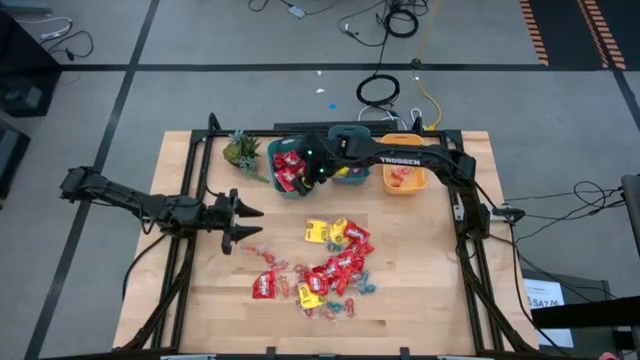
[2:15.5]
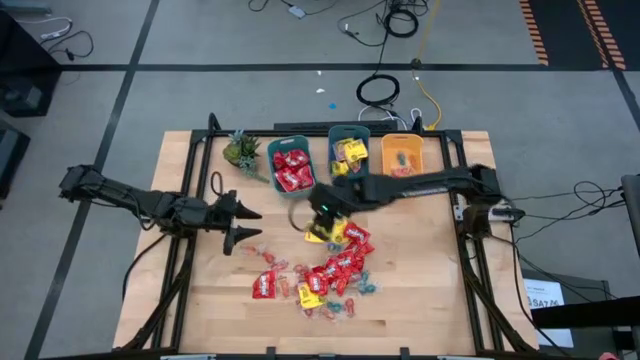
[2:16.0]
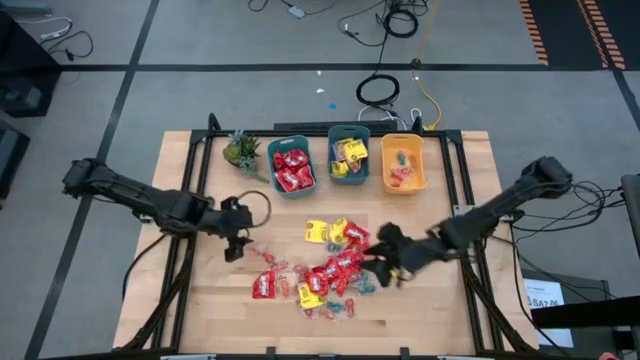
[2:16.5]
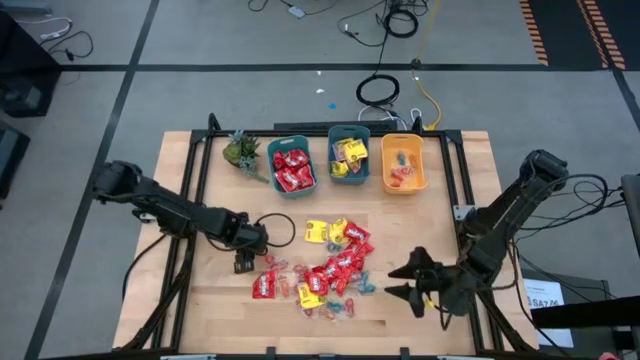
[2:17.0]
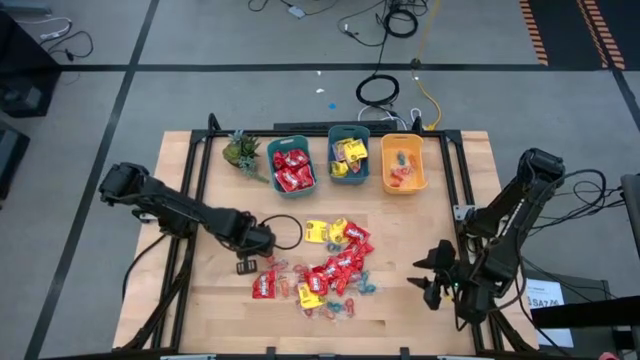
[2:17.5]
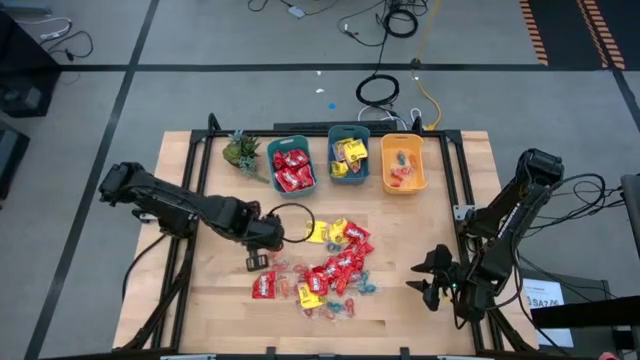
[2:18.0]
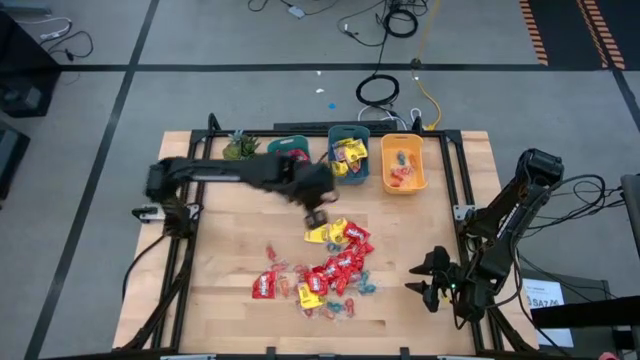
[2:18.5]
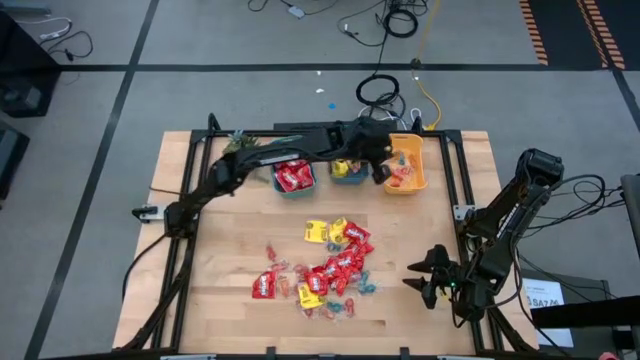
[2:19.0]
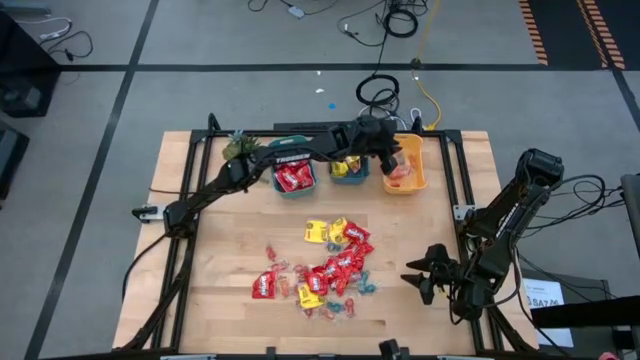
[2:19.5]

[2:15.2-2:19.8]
Task: Sort candy
Put the orange gummy candy into the yellow bin

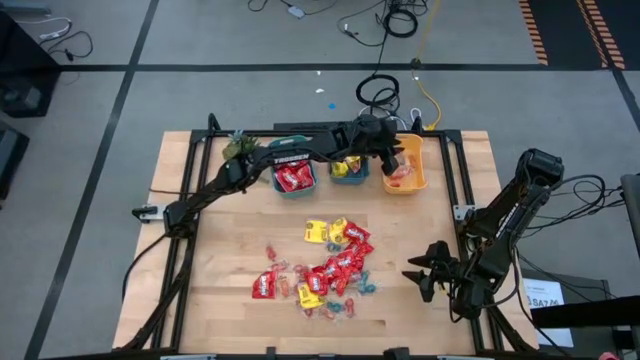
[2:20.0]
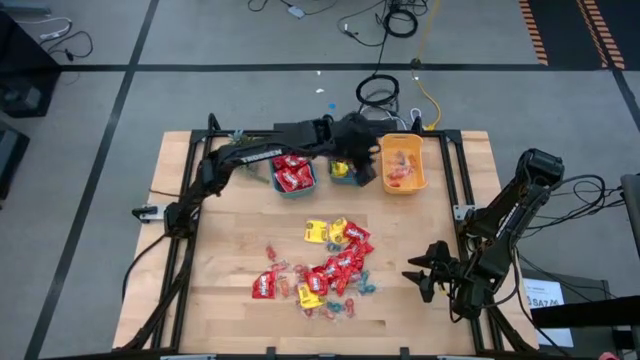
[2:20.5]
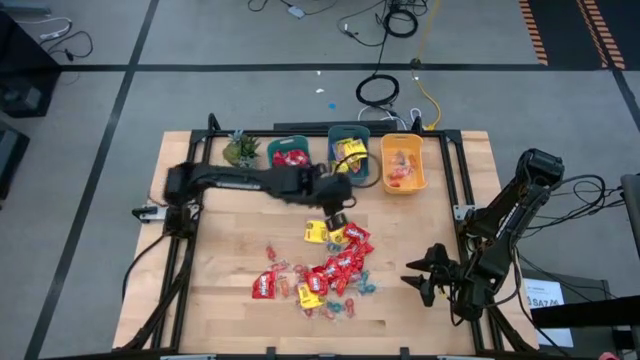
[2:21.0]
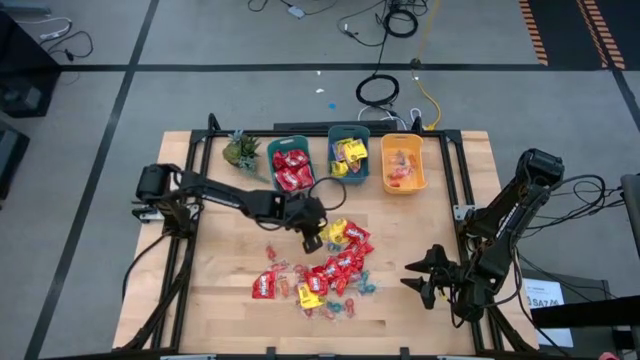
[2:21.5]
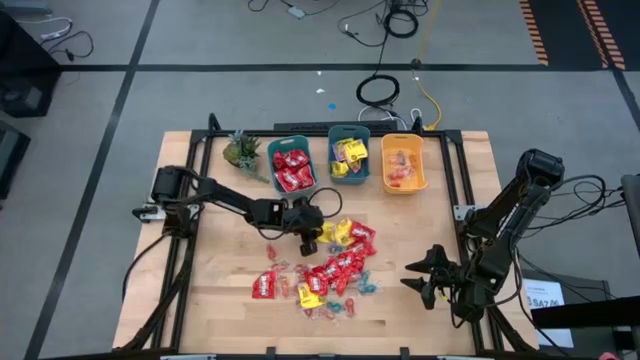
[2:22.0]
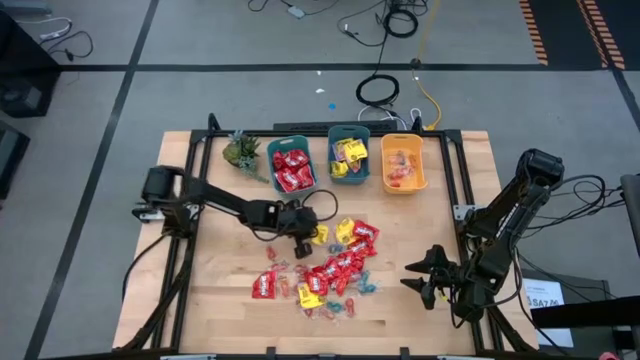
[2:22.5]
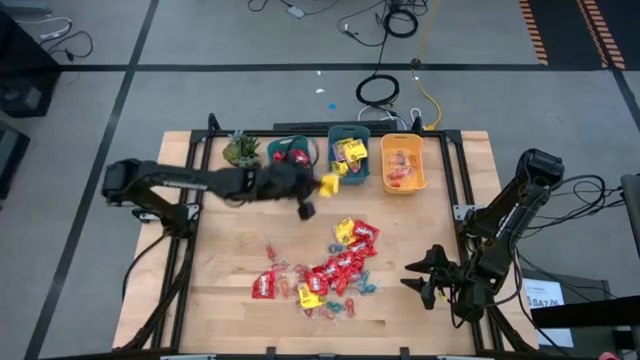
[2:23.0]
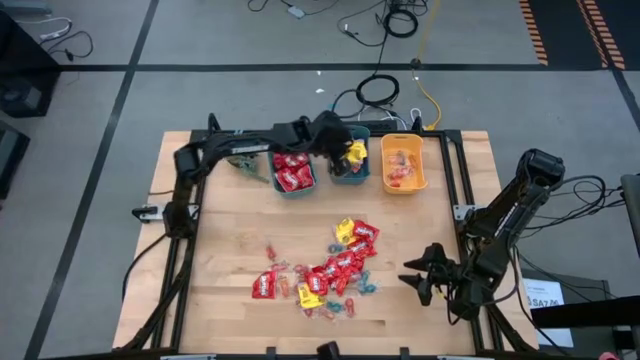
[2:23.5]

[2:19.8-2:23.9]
Put the yellow candy into the blue bin

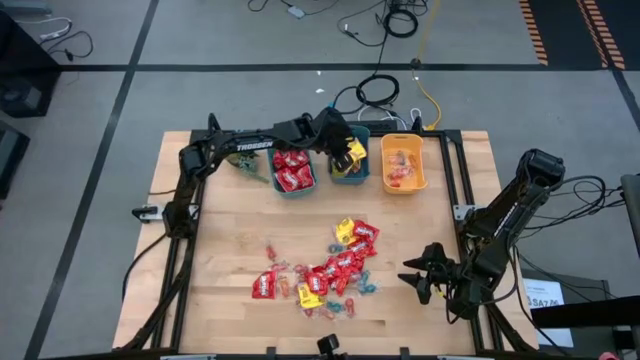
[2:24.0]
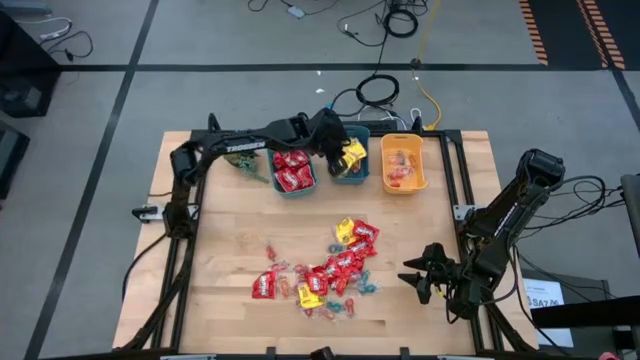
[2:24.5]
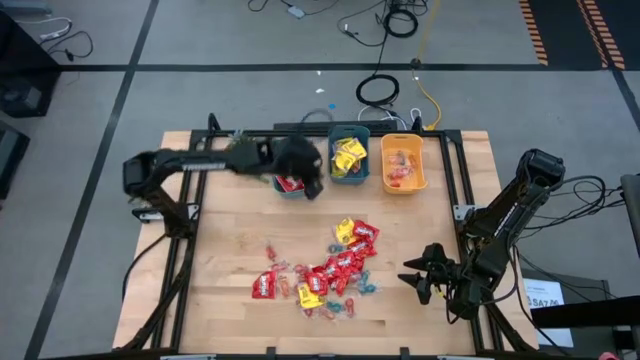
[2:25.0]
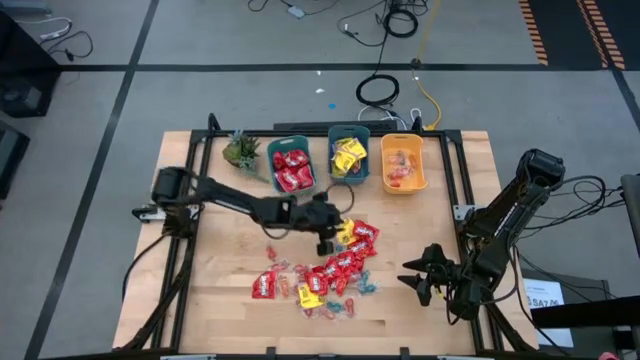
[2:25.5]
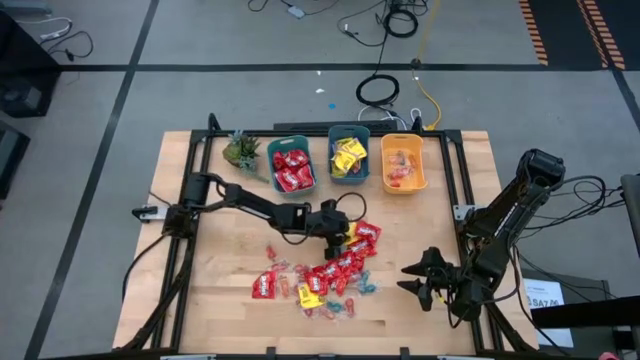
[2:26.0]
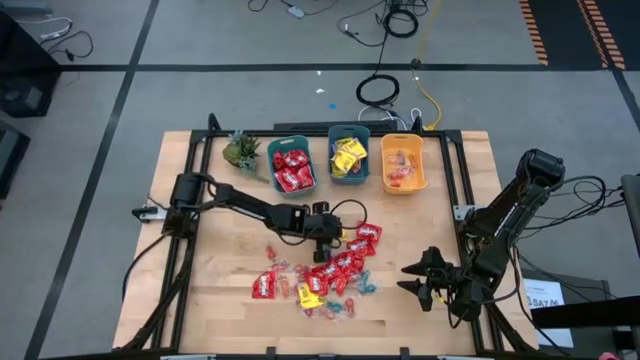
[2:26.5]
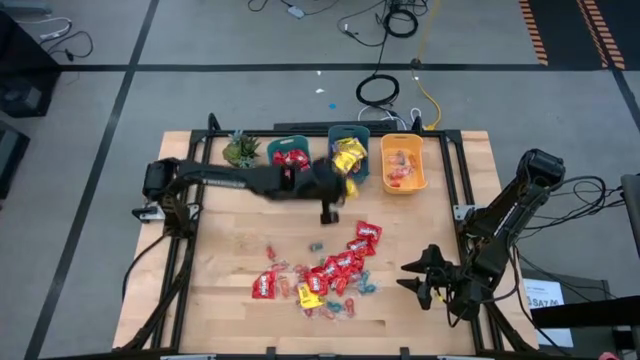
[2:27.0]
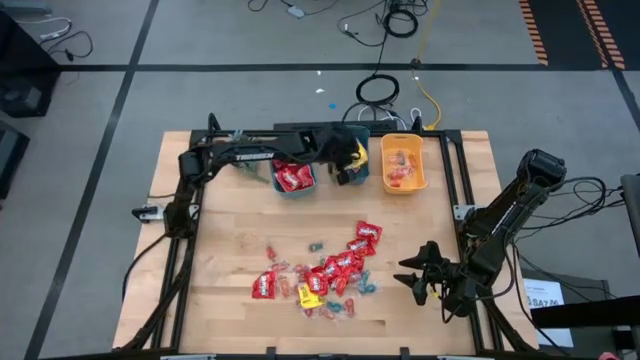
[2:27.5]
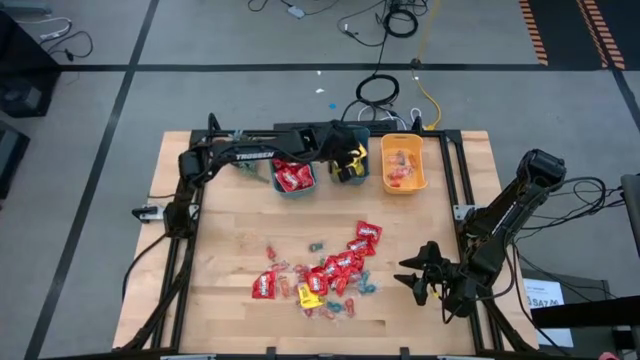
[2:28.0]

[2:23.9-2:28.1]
Put the yellow candy into the blue bin

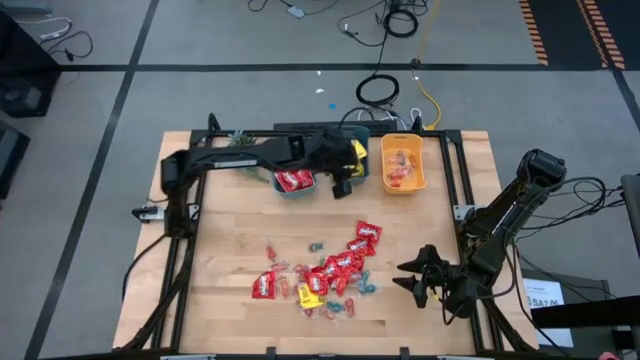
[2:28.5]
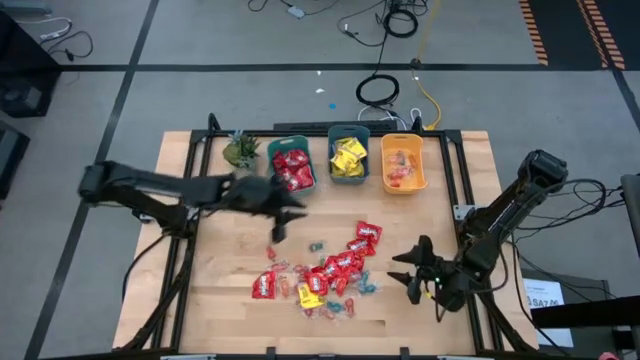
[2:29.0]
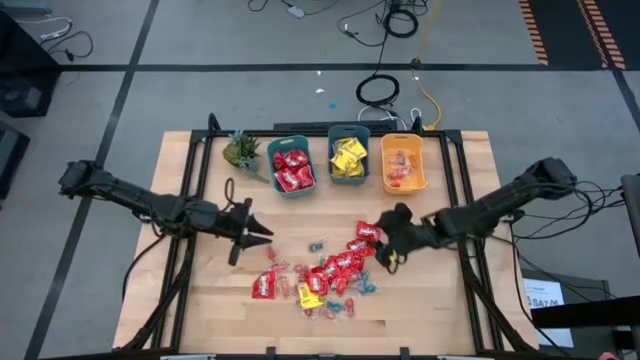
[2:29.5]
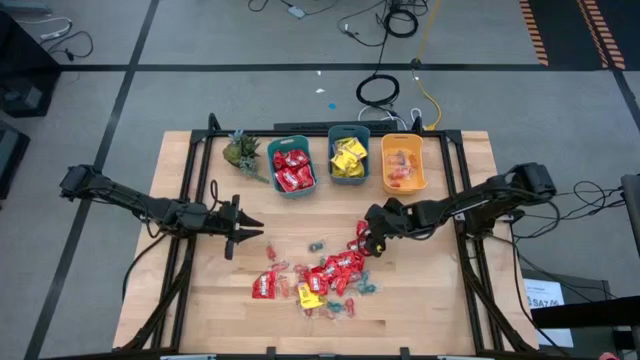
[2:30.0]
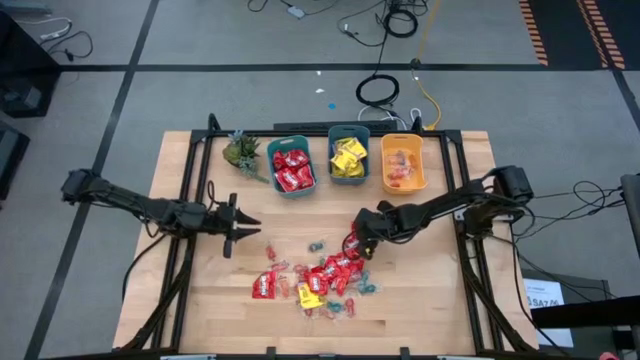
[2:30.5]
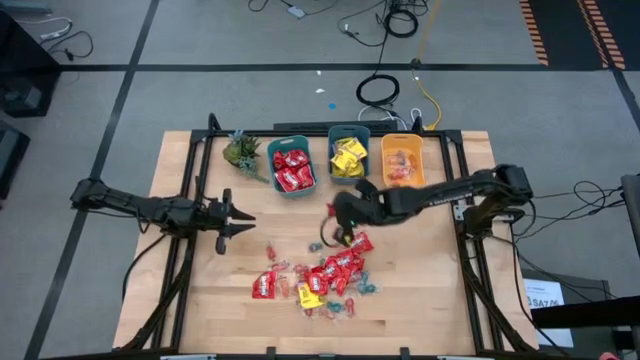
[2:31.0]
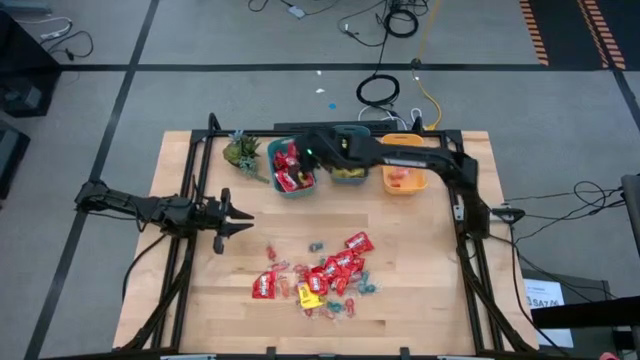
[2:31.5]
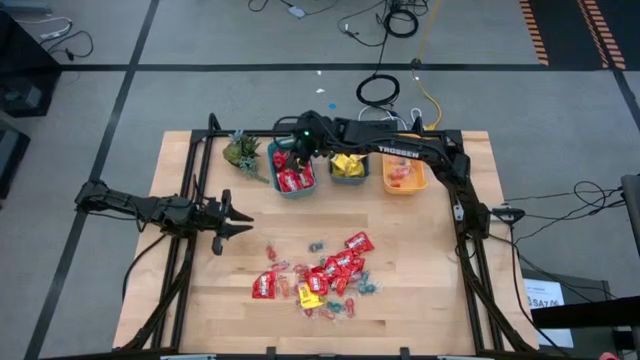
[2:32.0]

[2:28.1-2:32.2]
Put the red candy into the green bin

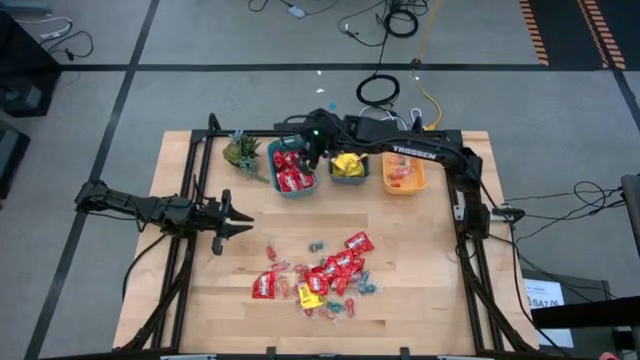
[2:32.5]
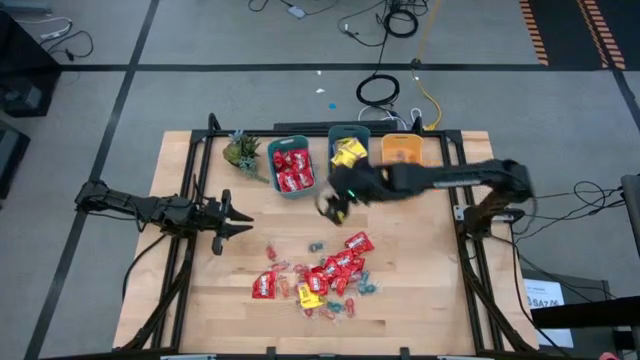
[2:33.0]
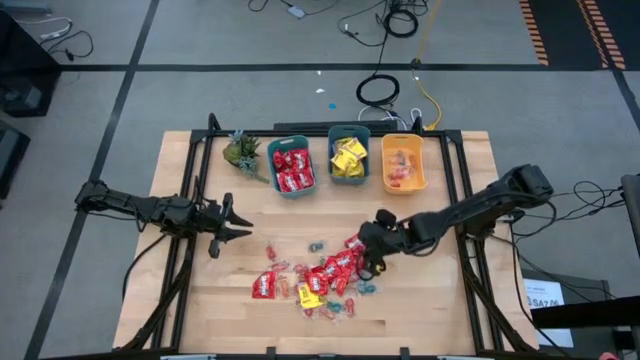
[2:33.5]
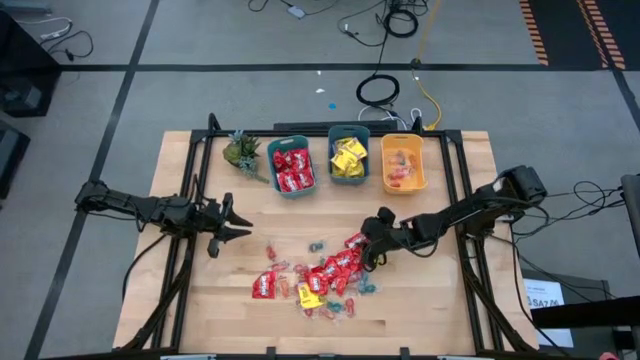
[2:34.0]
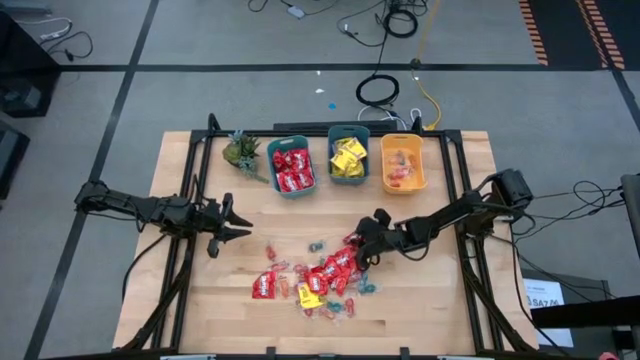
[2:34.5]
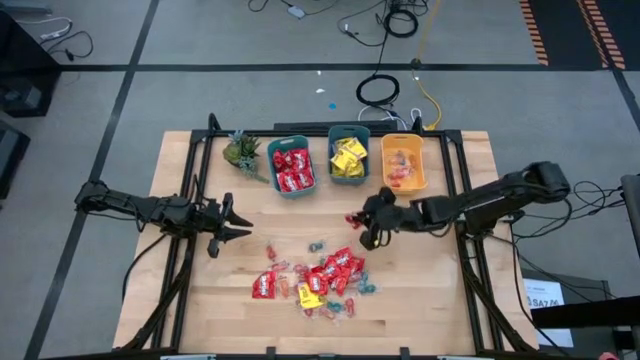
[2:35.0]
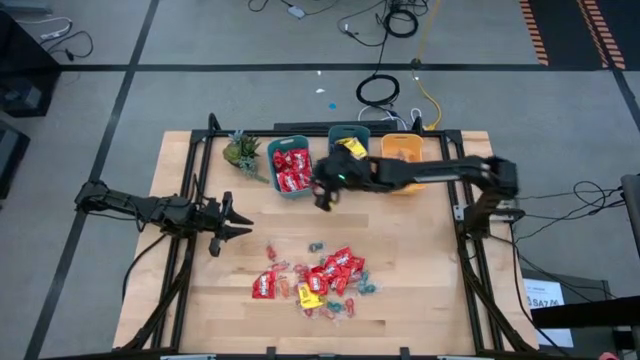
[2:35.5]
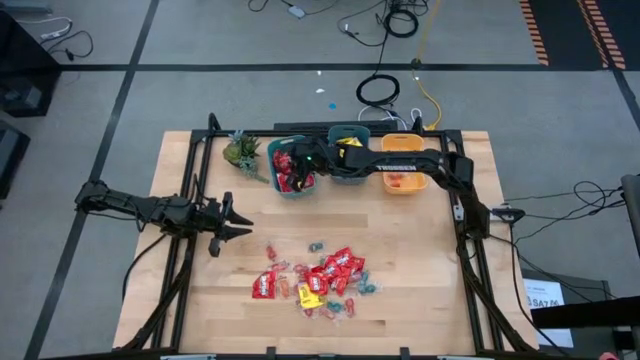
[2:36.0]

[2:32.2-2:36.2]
Put the red candy into the green bin
